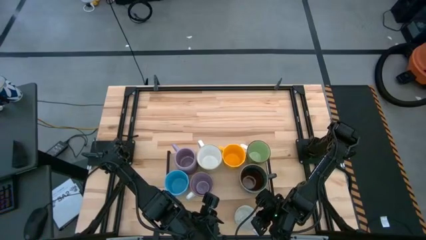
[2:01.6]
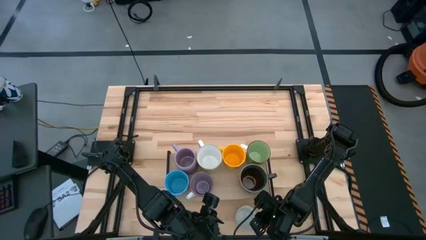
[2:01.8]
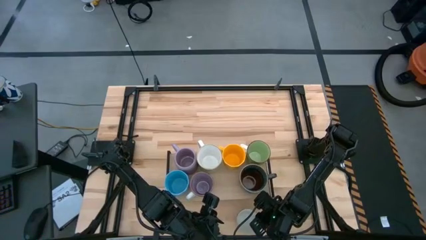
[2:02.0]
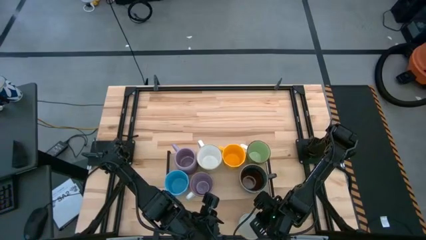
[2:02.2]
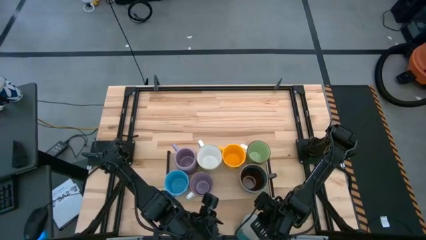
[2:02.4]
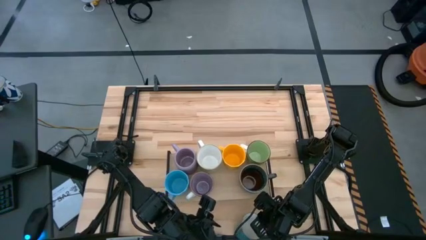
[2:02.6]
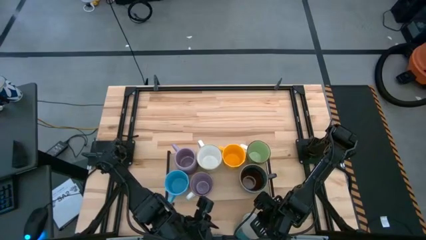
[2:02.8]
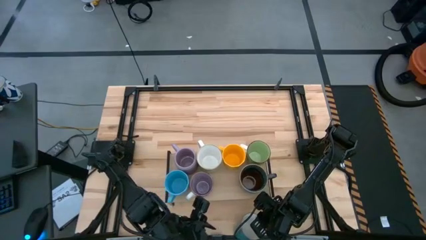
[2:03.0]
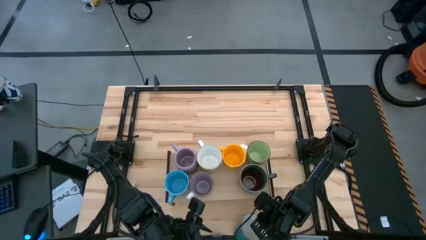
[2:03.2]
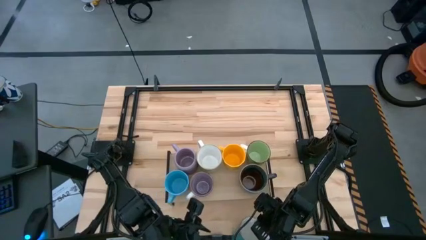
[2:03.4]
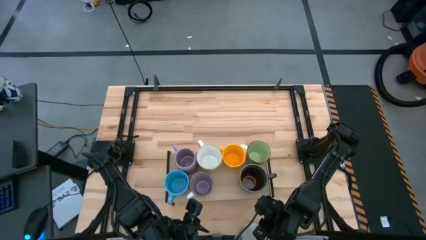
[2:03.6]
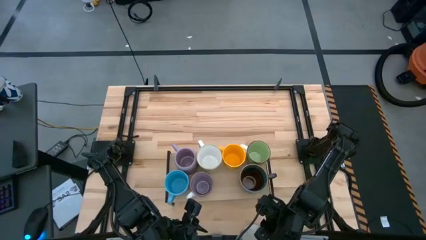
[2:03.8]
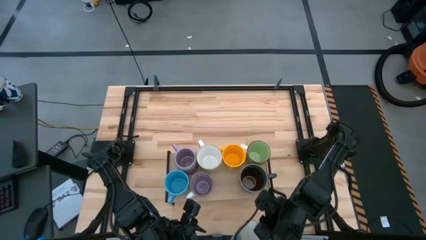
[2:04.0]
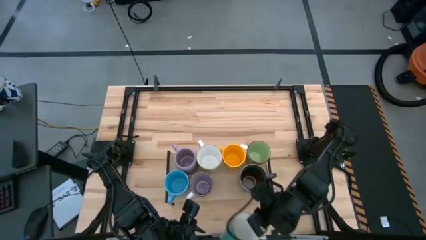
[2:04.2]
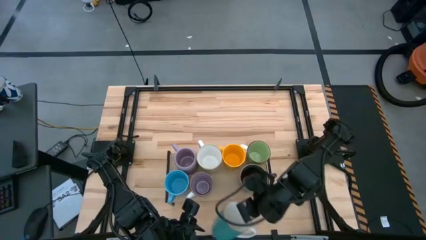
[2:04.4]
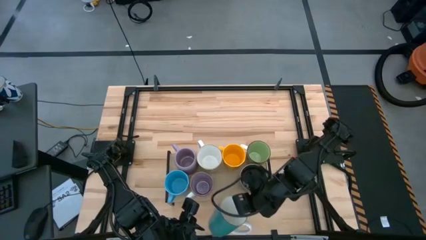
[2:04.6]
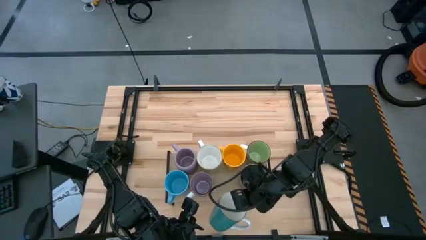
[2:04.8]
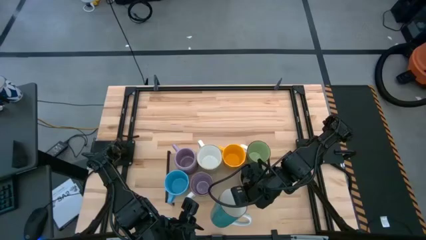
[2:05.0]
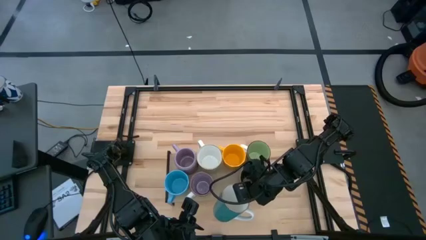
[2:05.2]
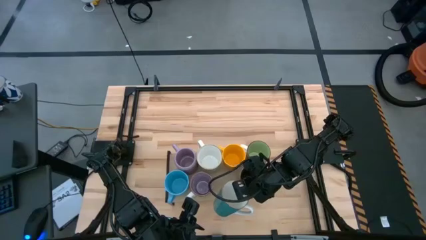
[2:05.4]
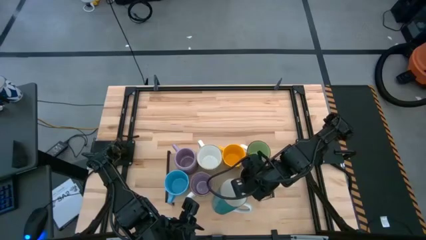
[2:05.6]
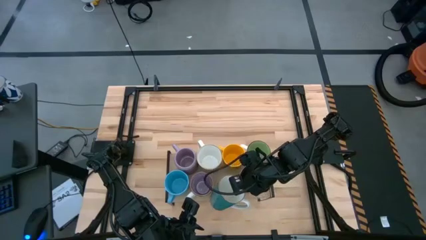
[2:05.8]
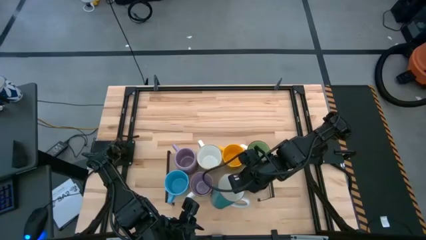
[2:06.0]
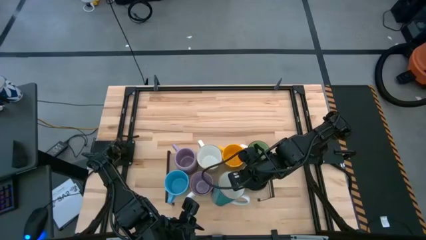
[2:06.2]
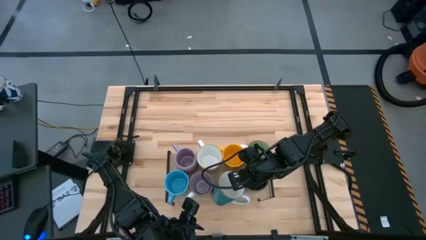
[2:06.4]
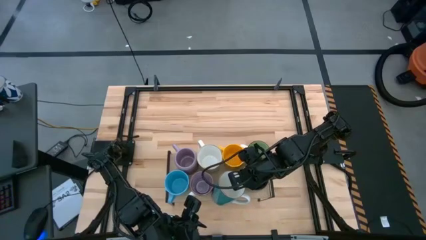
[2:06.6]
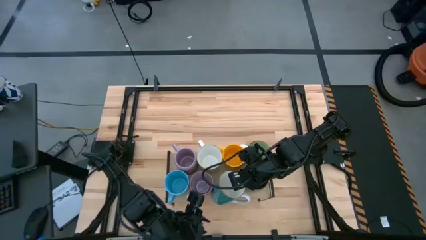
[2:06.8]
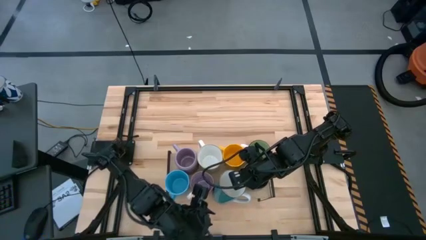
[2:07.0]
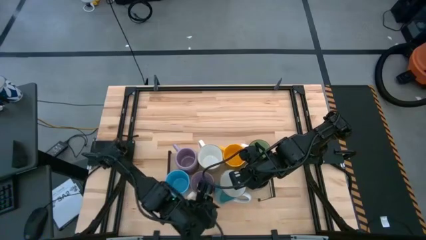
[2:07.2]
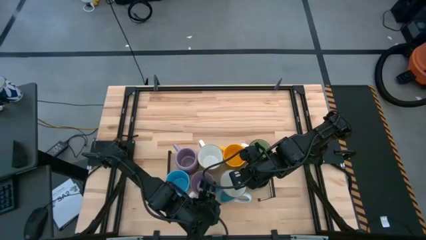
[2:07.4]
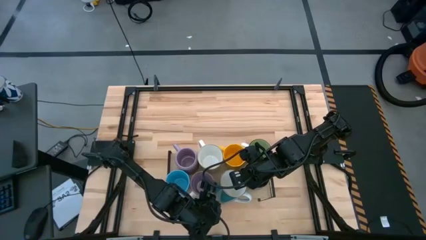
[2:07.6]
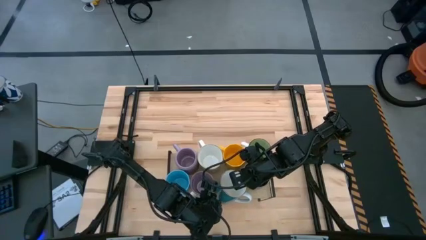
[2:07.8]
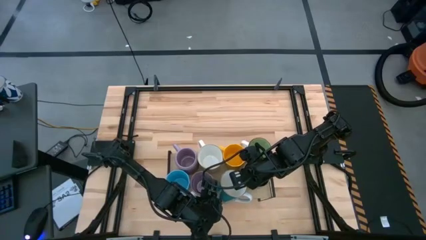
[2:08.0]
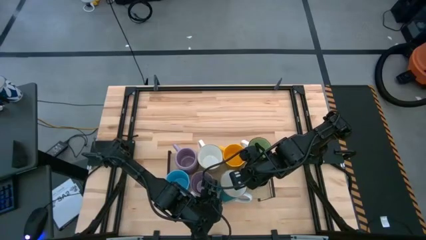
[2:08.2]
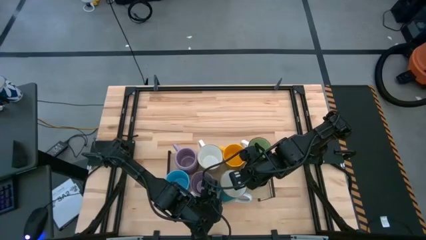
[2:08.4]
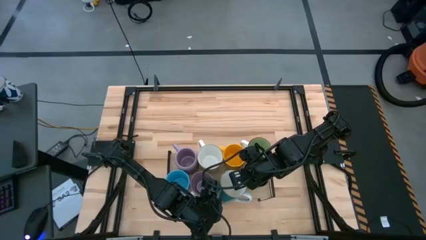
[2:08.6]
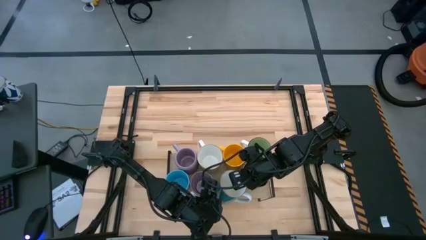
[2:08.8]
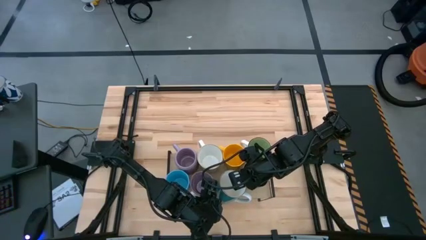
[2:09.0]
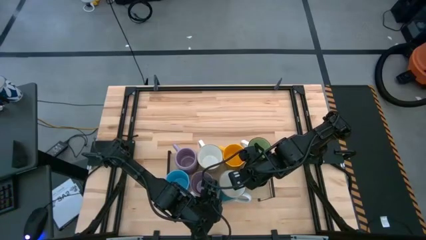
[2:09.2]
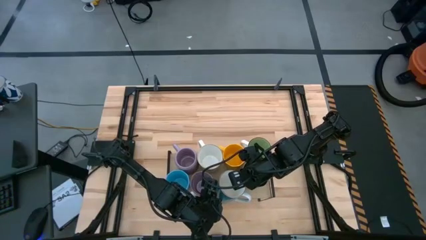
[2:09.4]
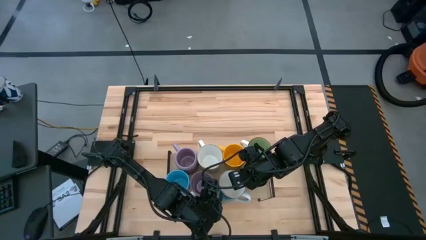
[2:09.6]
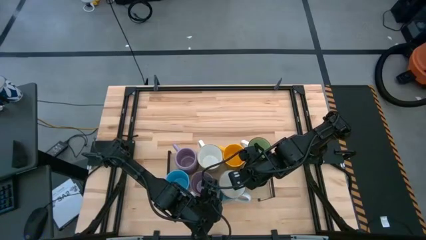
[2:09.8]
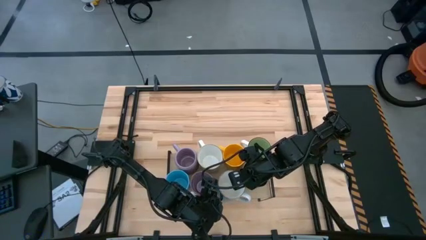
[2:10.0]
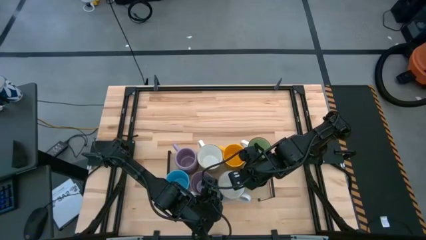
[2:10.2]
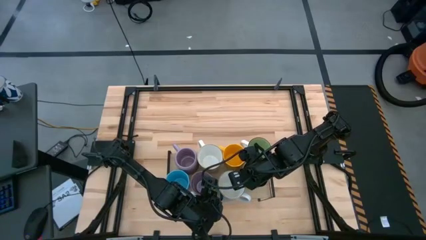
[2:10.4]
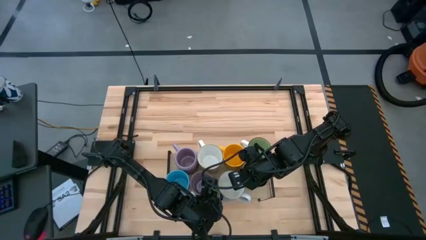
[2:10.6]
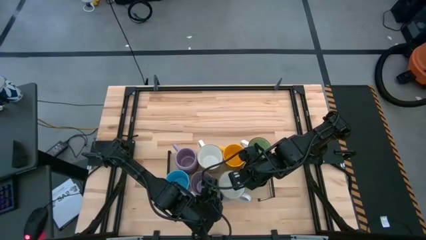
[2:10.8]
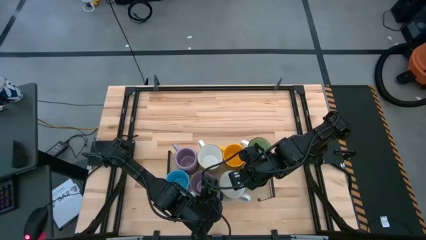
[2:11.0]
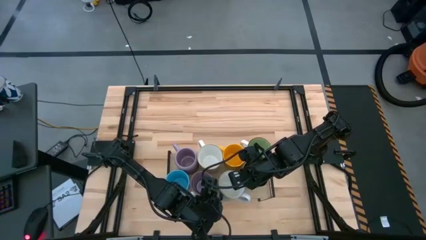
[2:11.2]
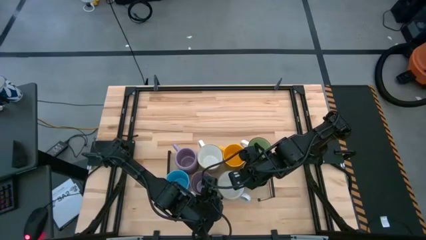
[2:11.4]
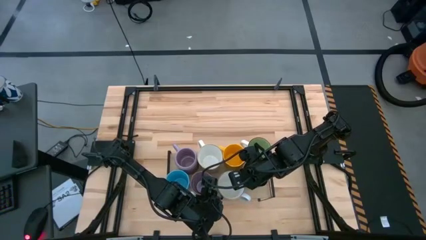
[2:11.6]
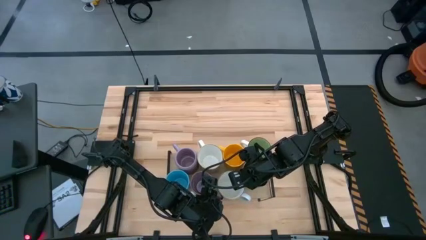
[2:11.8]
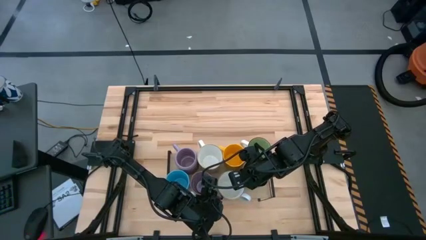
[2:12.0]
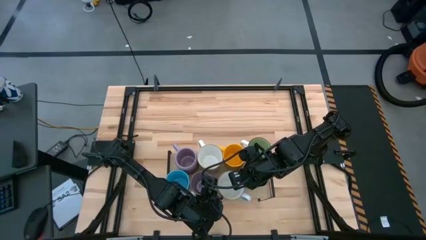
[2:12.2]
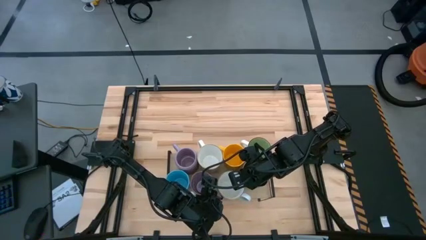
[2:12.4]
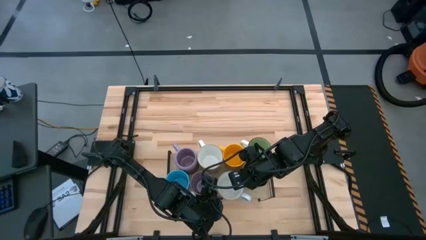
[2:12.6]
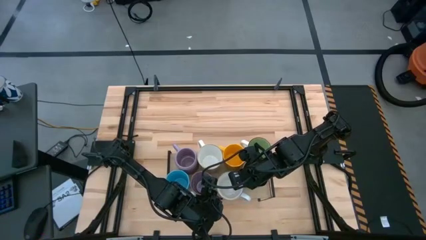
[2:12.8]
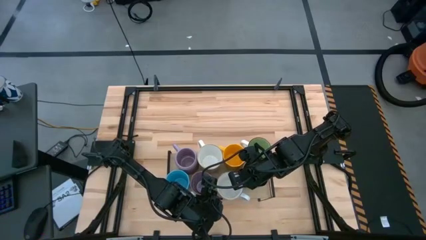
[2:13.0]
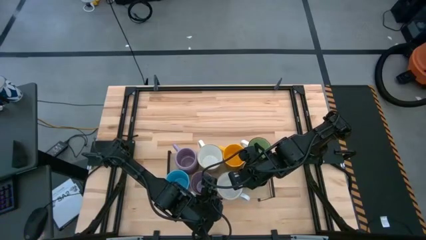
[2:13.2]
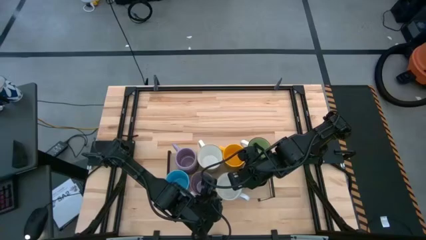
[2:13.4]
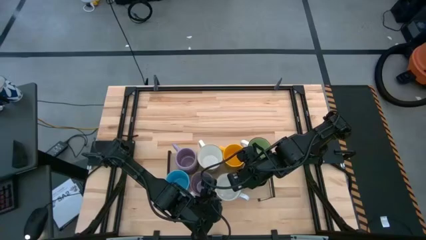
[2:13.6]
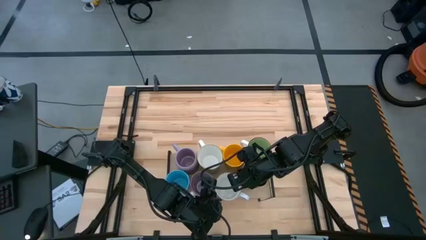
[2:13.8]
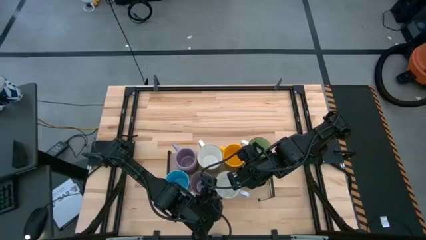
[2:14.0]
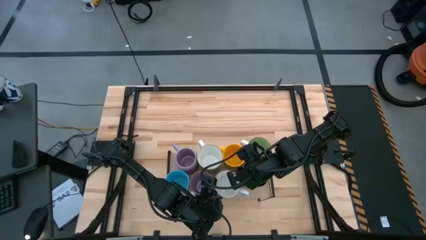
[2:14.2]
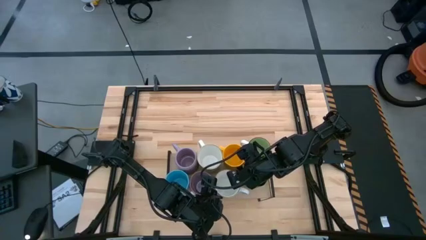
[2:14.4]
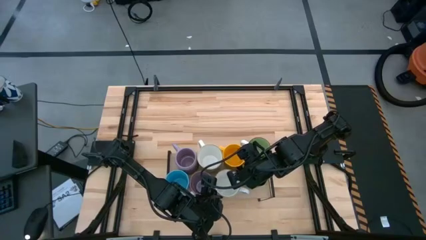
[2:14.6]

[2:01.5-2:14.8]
Task: Place coffee mugs
Put the blue white mug on the shelf

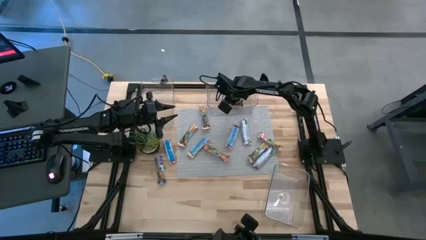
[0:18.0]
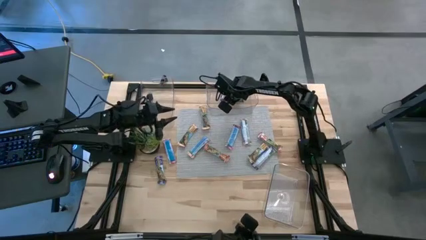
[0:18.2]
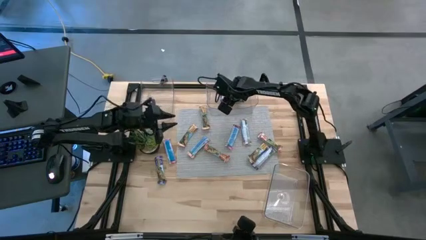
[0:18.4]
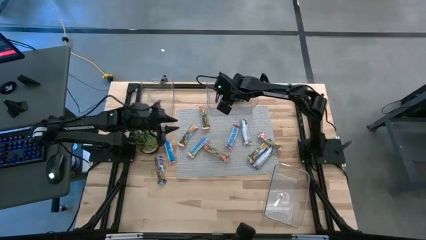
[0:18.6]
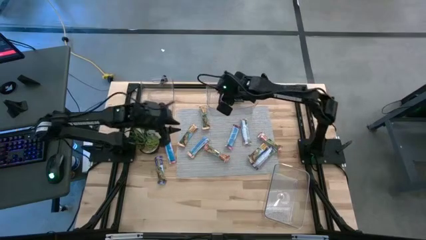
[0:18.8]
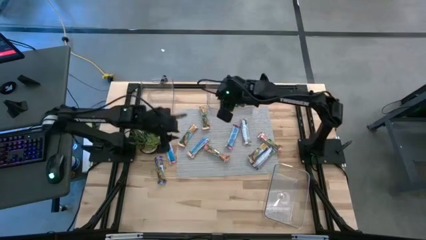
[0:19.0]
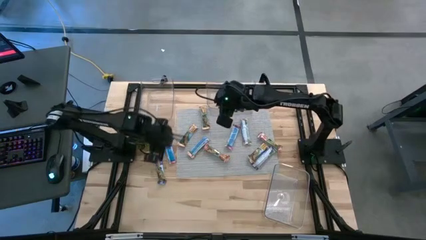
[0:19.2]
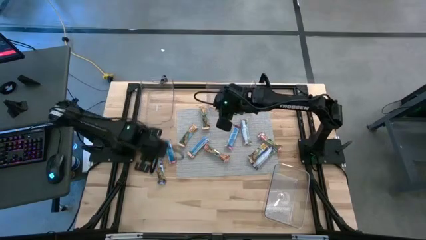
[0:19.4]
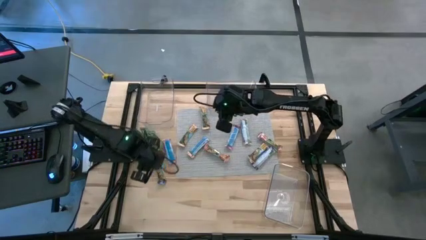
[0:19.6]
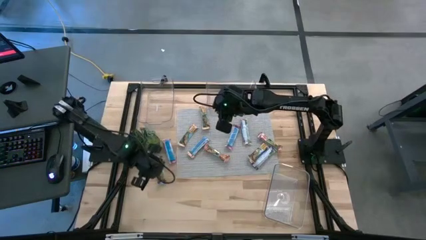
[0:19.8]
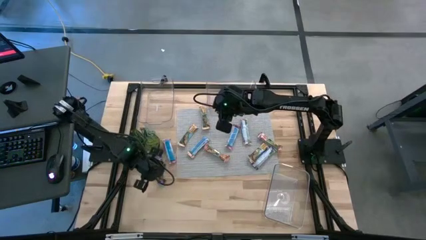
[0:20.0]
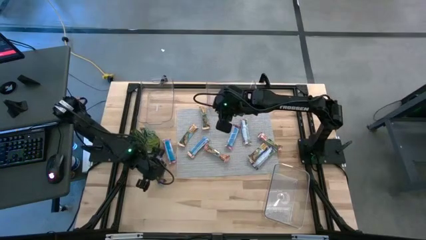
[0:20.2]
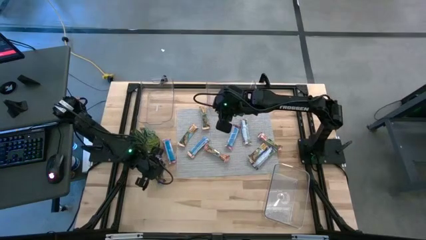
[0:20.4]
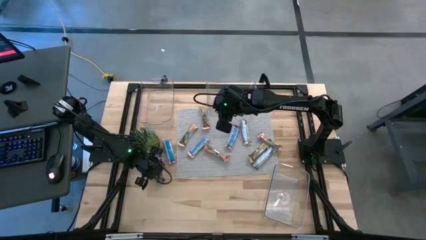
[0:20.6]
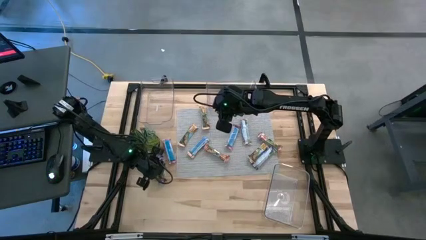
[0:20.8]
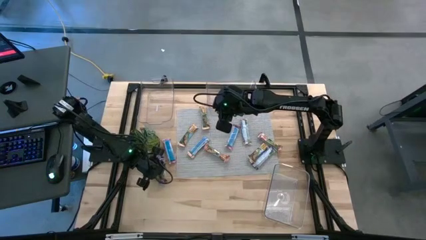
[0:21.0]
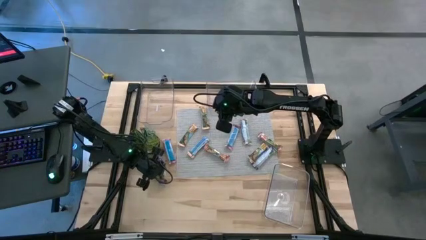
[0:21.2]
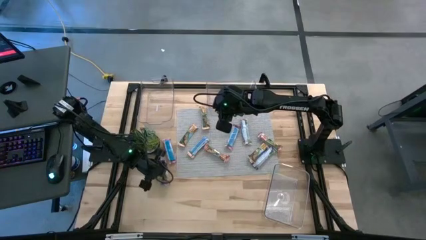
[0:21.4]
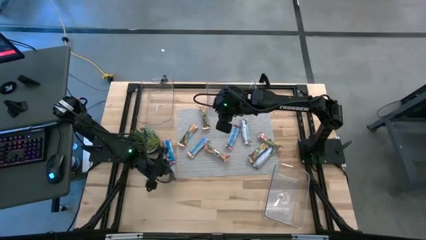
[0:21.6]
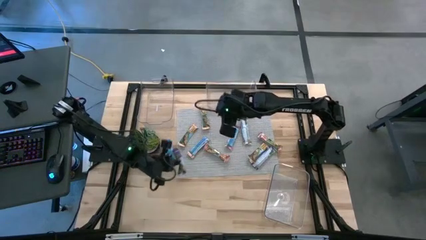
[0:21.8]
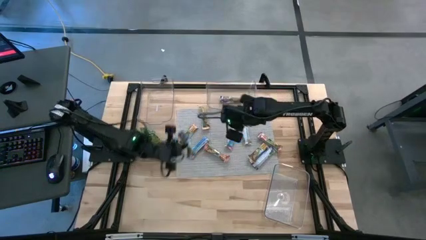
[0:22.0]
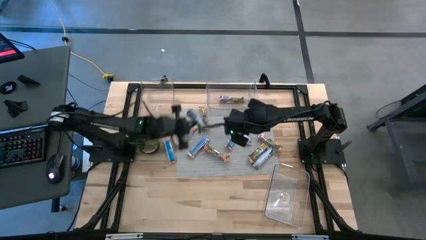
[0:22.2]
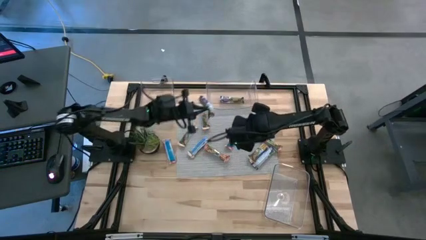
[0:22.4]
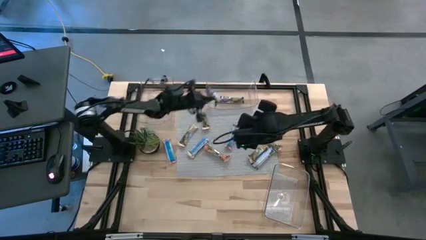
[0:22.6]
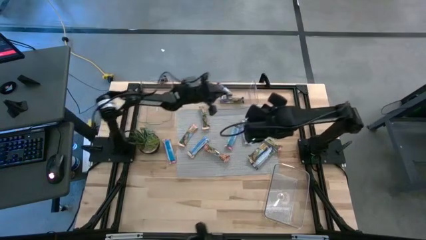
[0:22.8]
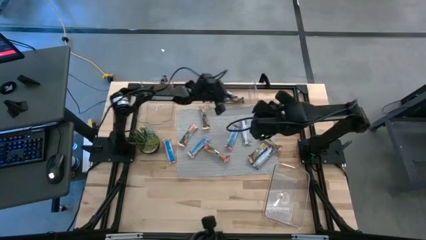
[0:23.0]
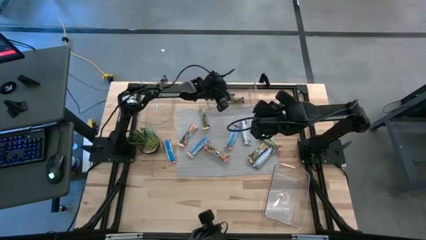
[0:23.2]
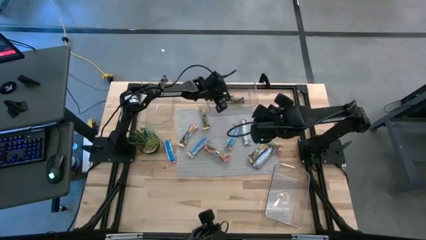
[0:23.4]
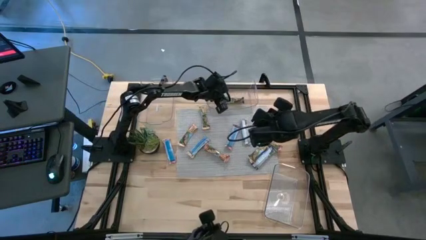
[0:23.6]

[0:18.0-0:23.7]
Task: Pick and place Granola Bars by type
Put the blue granola bar into the right transparent bin
